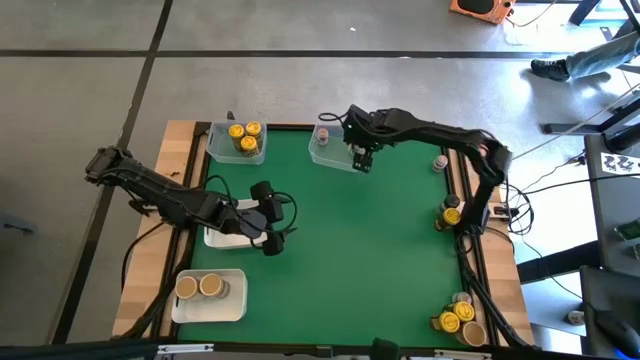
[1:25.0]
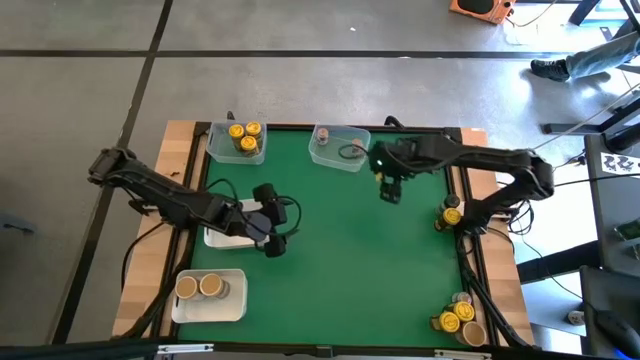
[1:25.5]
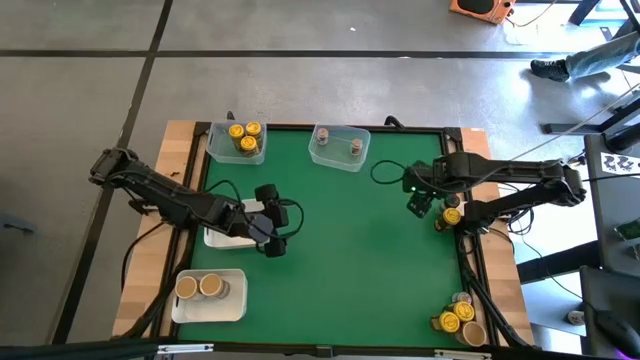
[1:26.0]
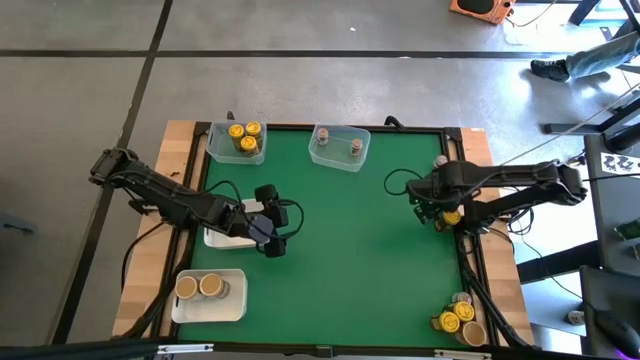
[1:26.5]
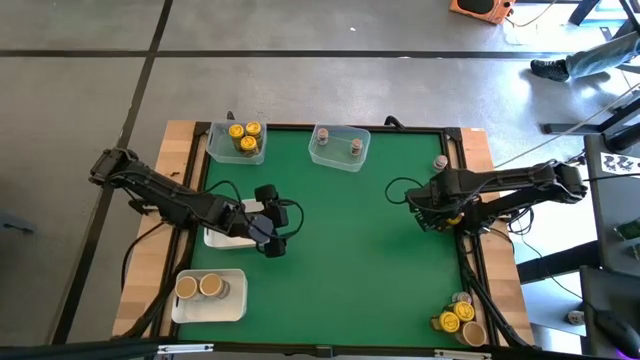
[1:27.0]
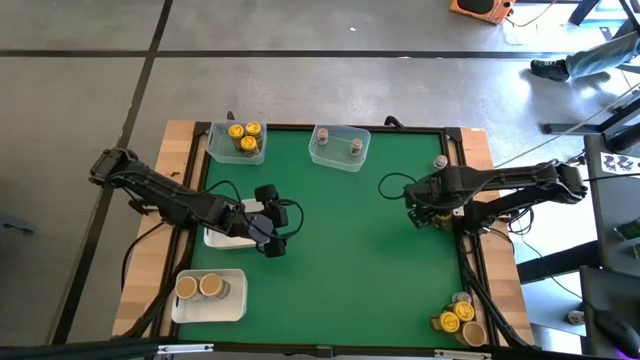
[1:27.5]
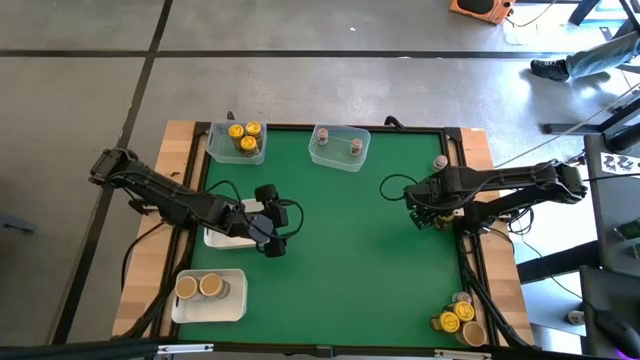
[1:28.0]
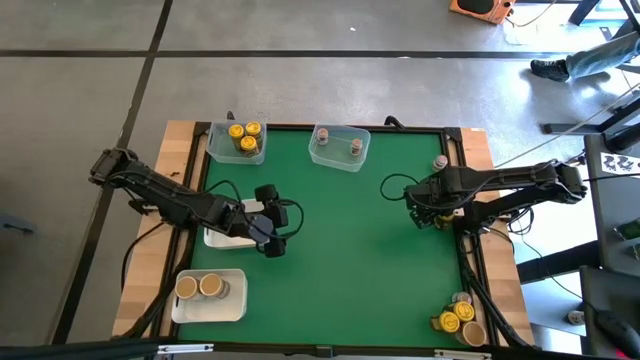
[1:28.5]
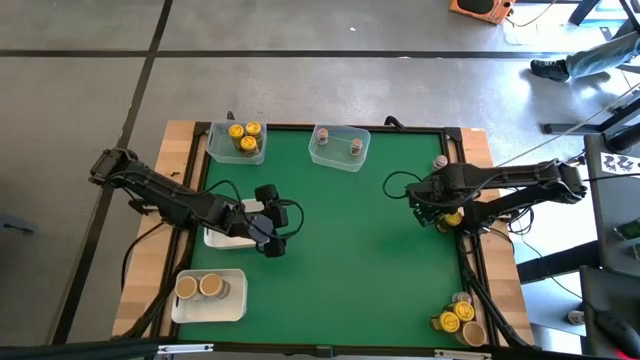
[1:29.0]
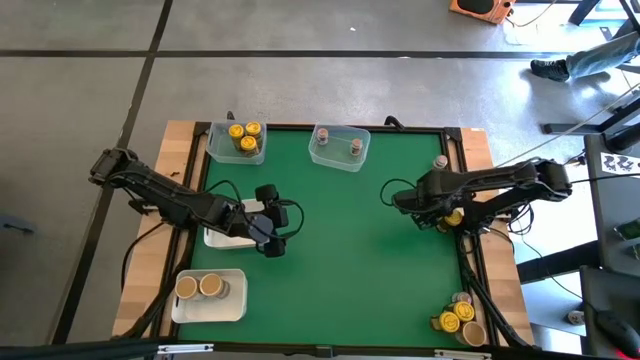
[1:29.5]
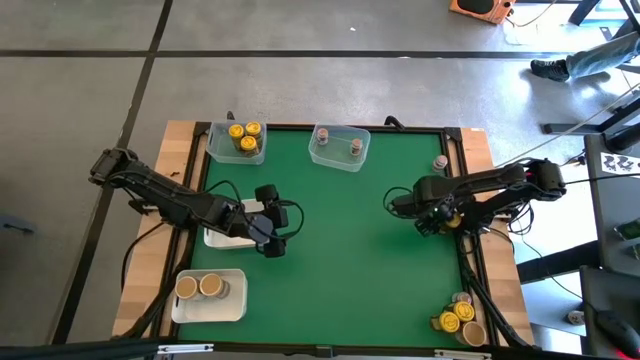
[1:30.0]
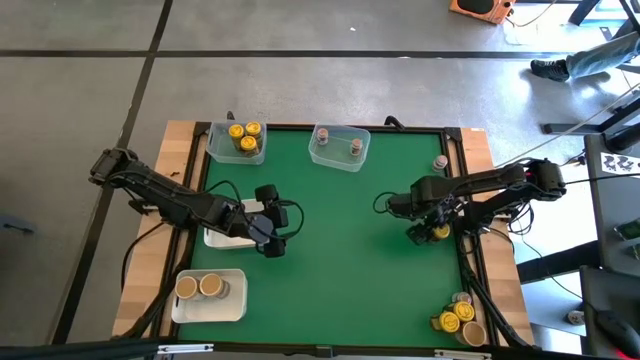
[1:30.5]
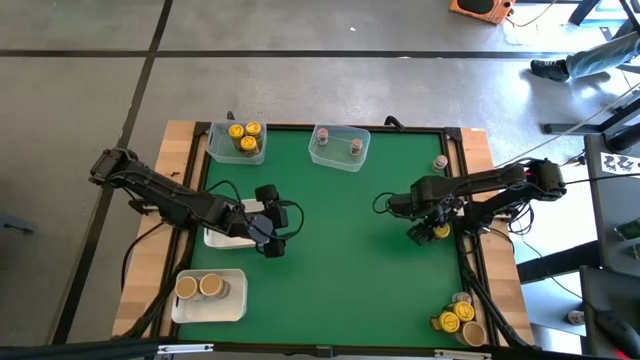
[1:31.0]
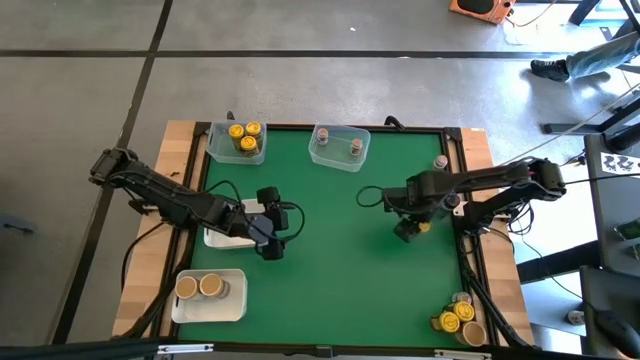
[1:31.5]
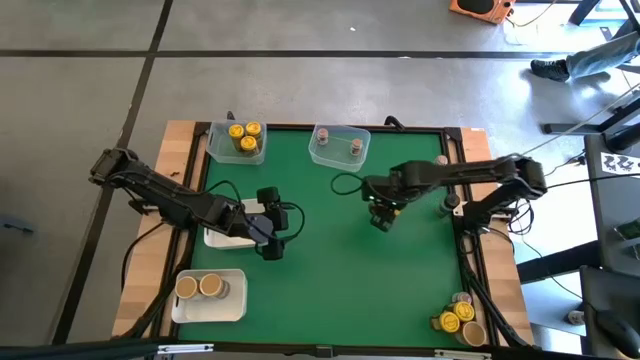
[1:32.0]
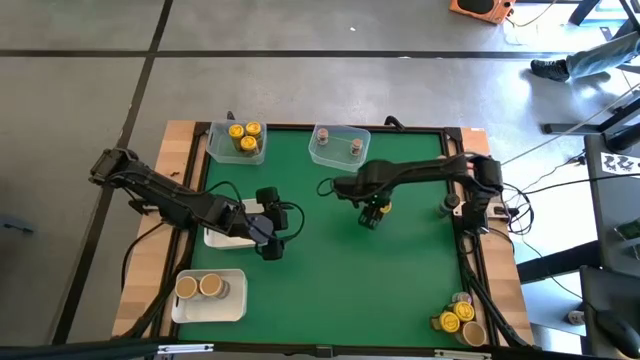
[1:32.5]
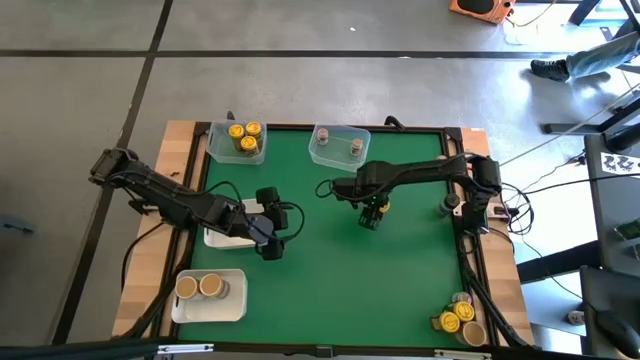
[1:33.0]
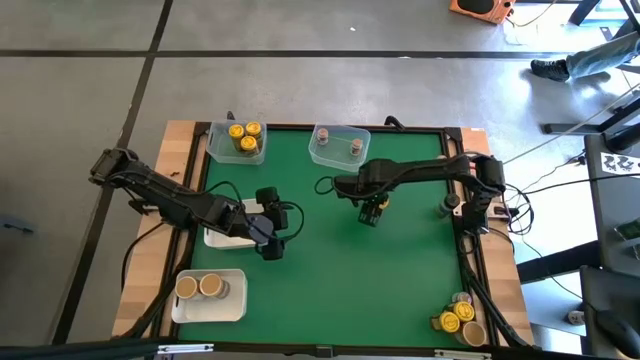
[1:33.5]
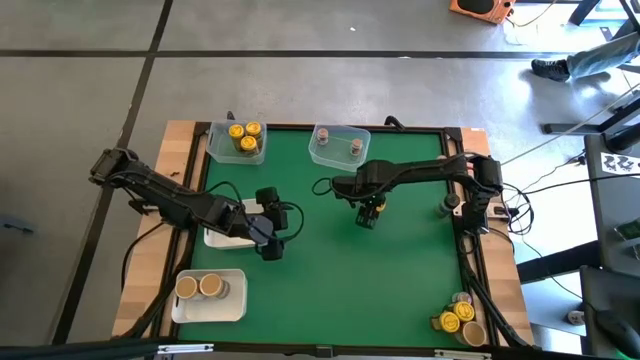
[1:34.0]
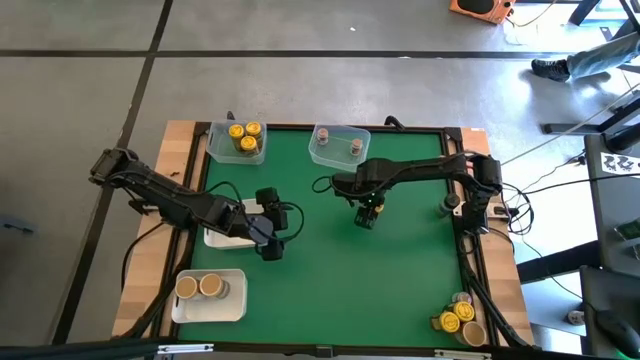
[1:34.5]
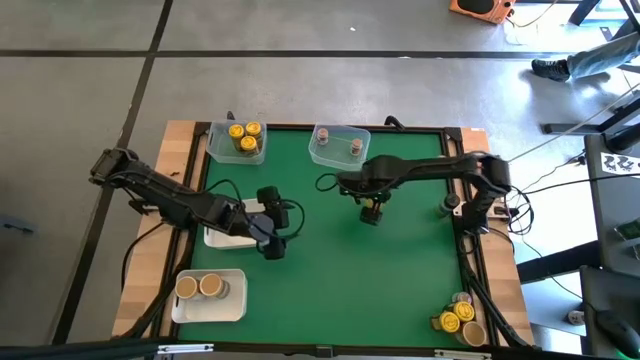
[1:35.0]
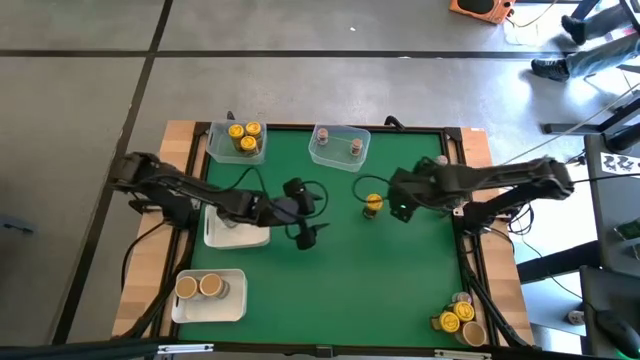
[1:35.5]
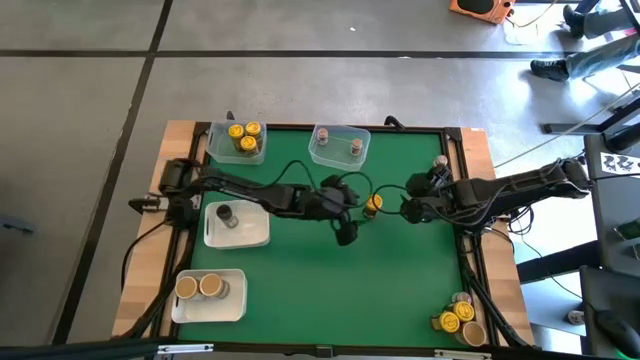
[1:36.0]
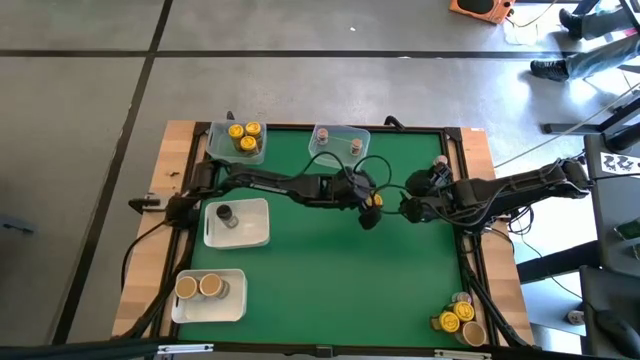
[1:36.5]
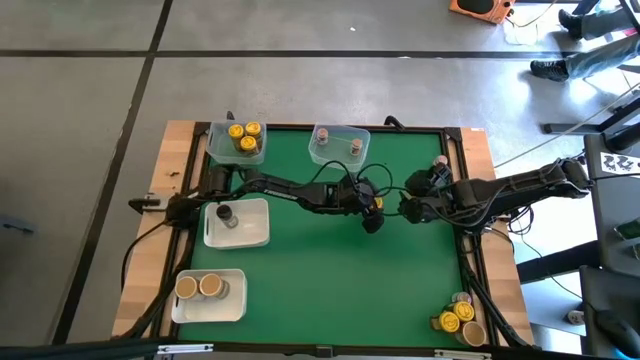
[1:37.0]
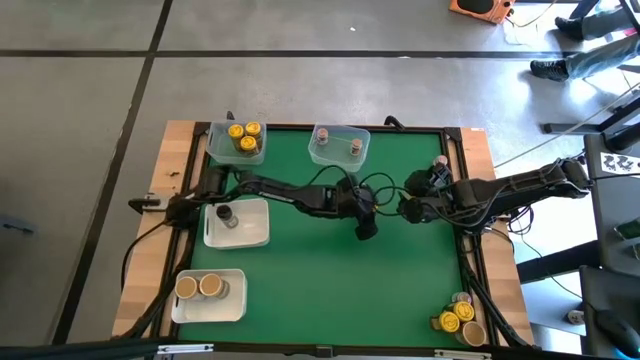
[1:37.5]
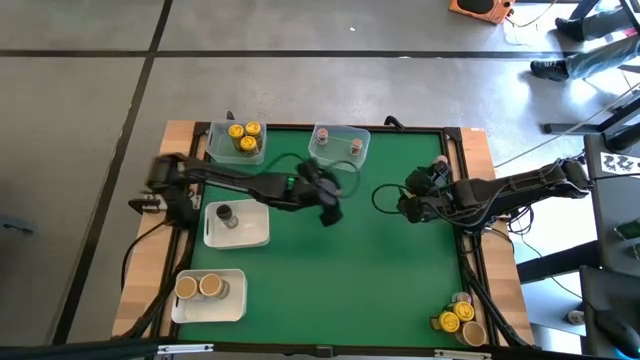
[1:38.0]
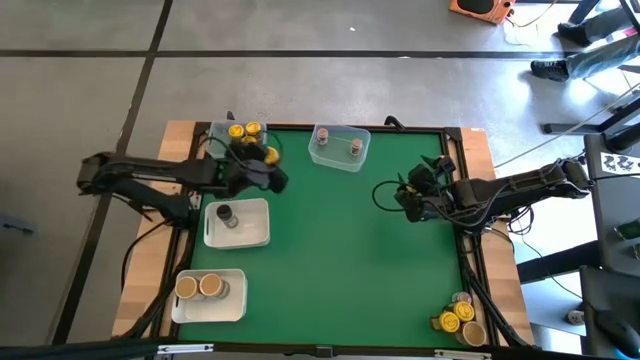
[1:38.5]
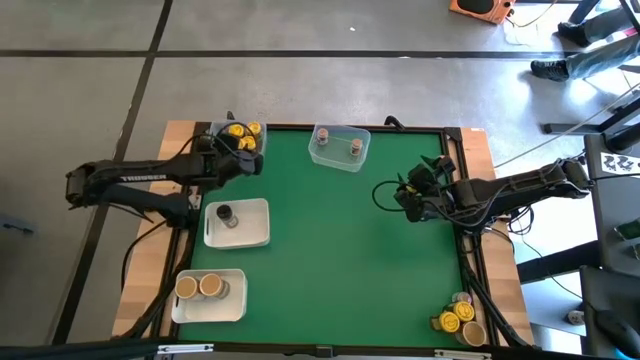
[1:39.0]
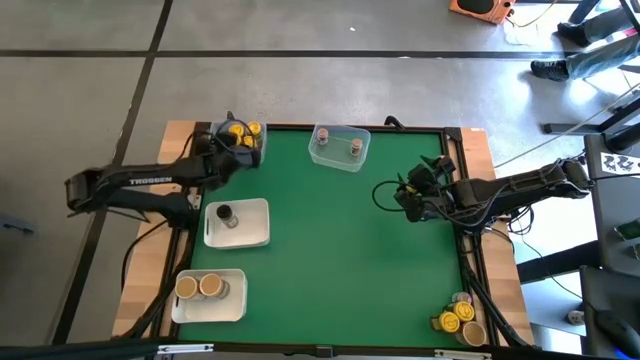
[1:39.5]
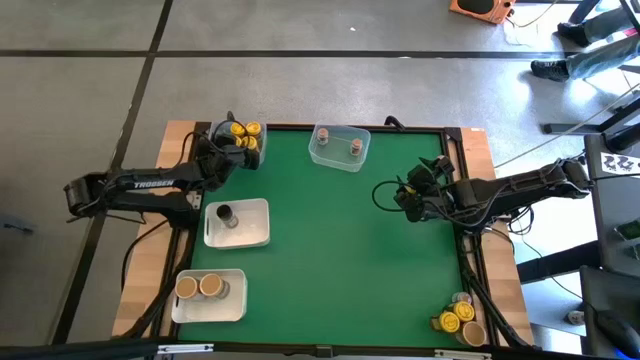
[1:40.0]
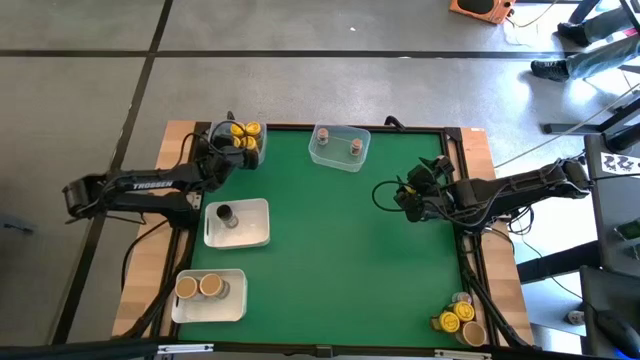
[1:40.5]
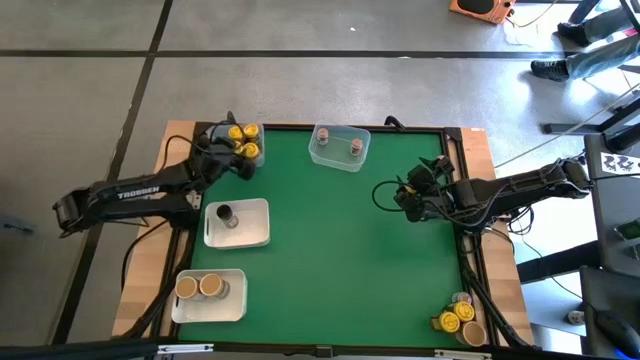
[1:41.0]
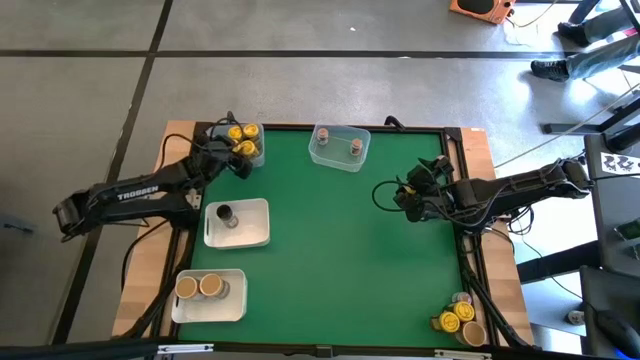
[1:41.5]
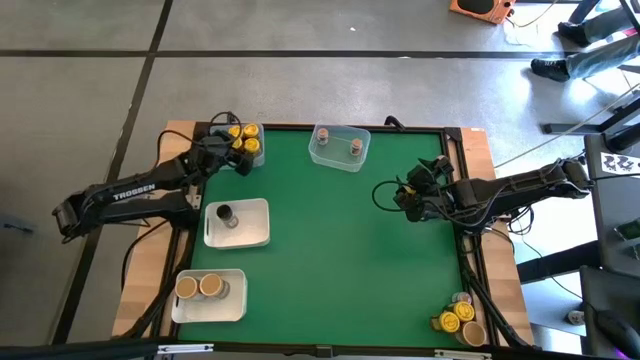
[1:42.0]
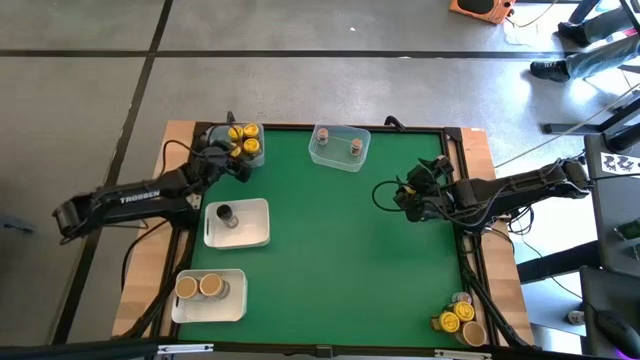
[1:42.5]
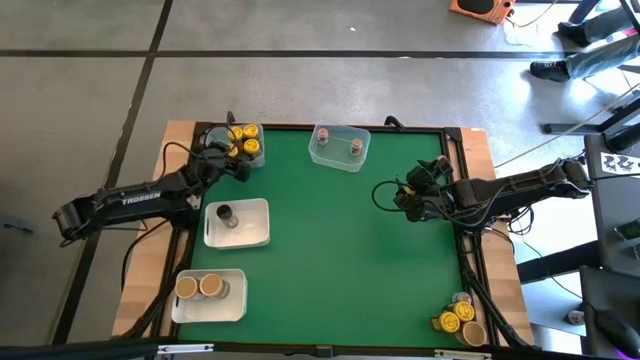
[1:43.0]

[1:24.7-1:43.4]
Task: Sort spices by type
Put the yellow seasoning bottle into the left transparent bin

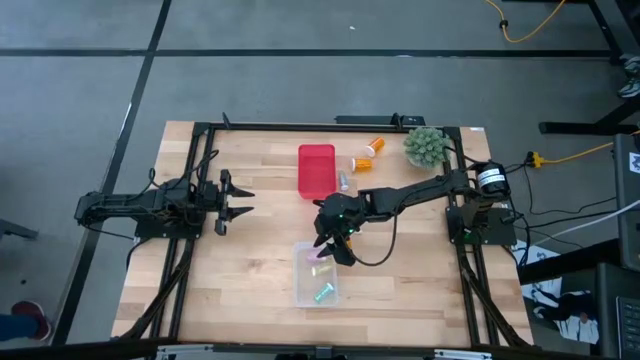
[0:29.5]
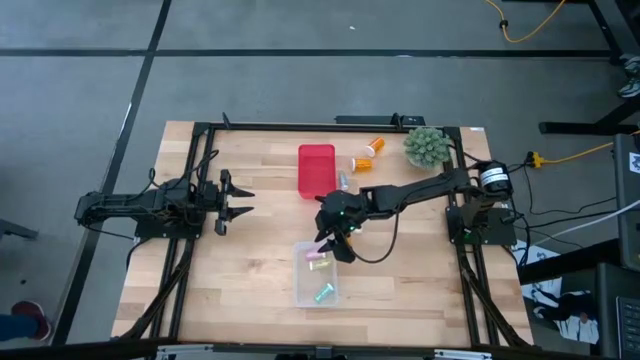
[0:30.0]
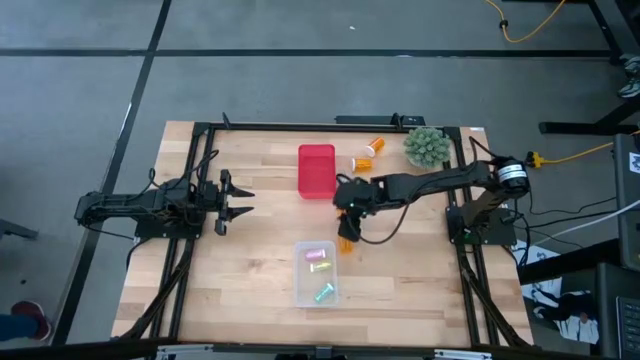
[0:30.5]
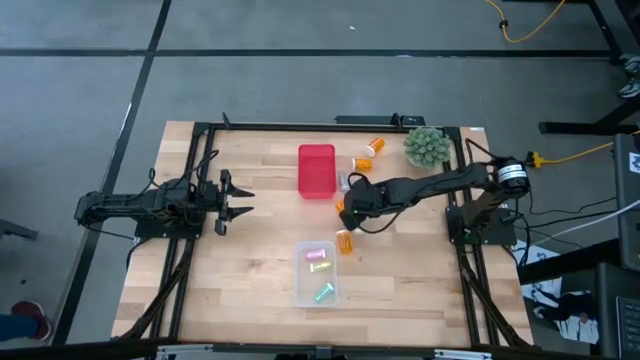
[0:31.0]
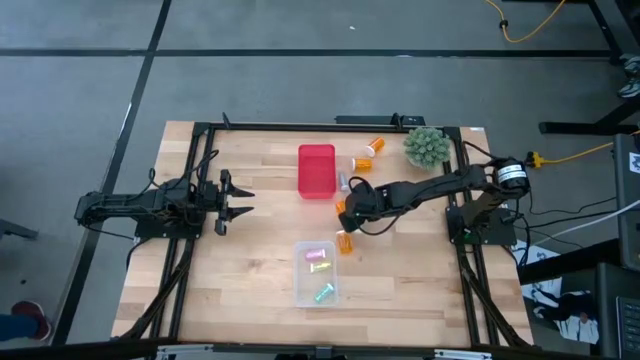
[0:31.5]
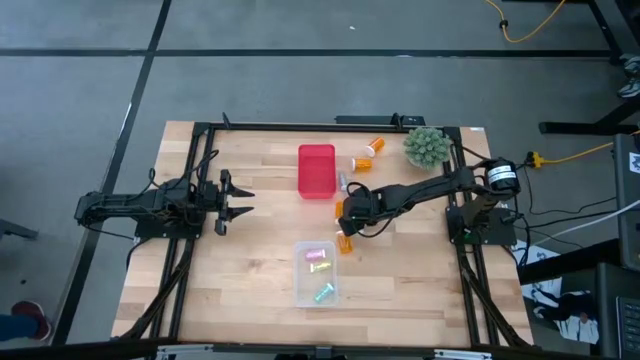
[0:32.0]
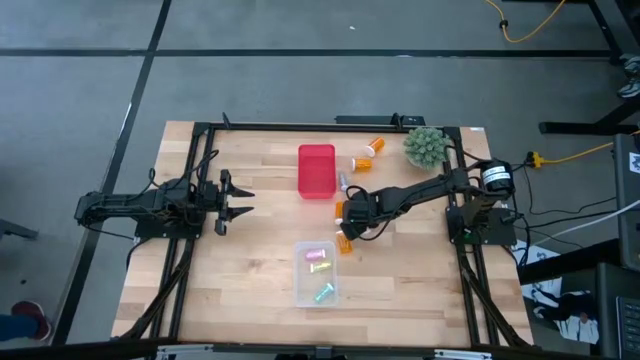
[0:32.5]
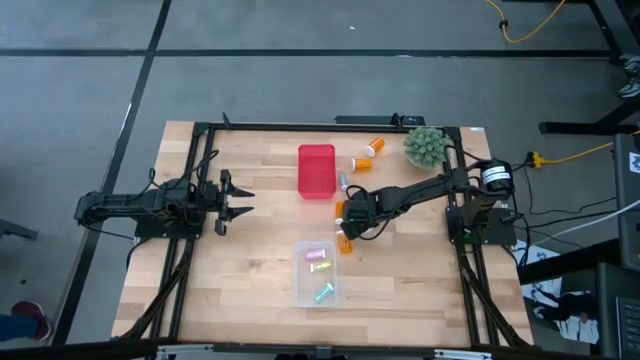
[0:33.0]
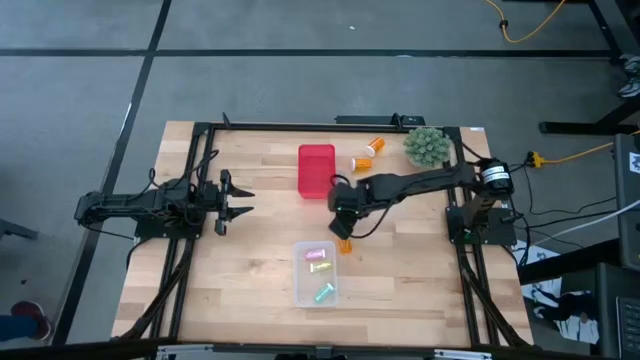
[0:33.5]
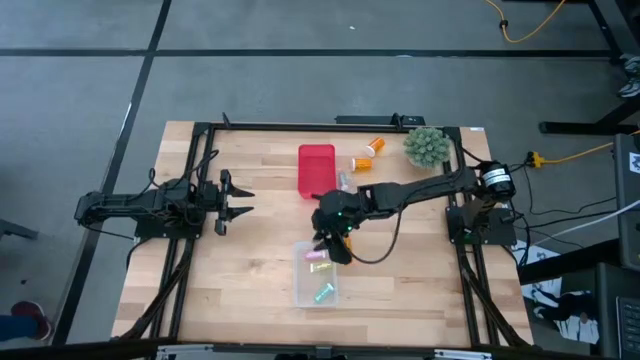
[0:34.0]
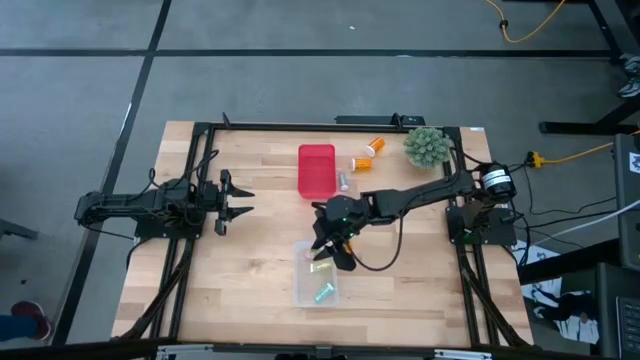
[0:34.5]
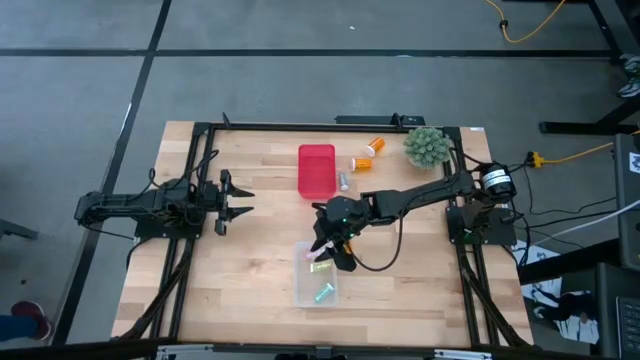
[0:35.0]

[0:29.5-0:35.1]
Task: Pick and place medicine bottles into bin by pill shape (circle, oval)
Put the small yellow pill bottle into the transparent bin
